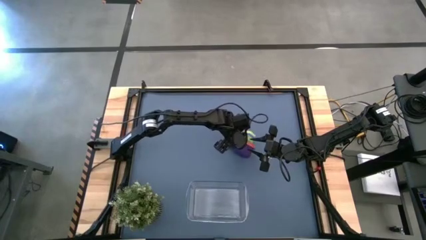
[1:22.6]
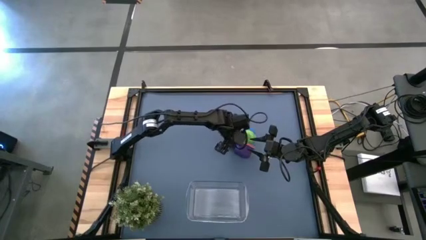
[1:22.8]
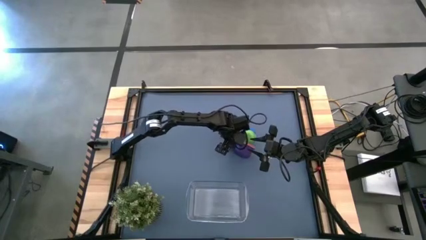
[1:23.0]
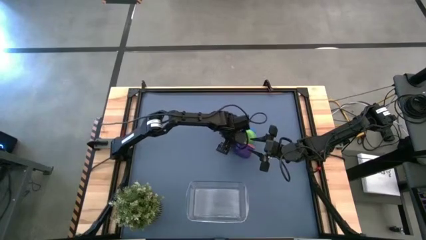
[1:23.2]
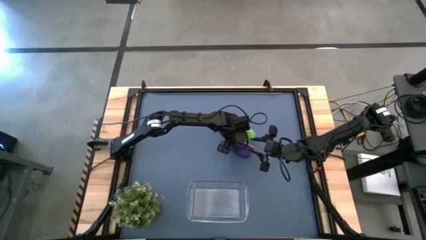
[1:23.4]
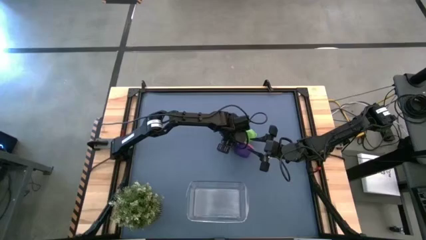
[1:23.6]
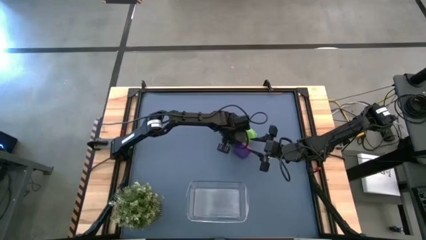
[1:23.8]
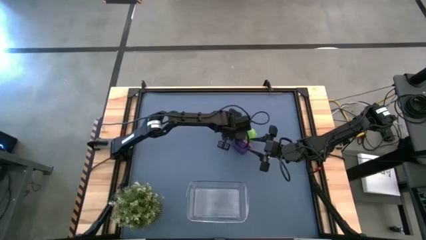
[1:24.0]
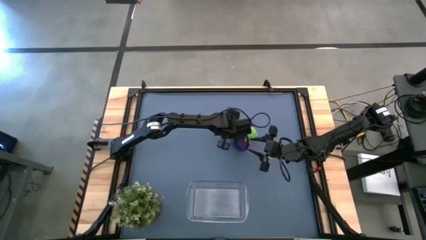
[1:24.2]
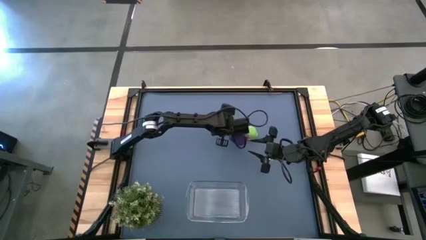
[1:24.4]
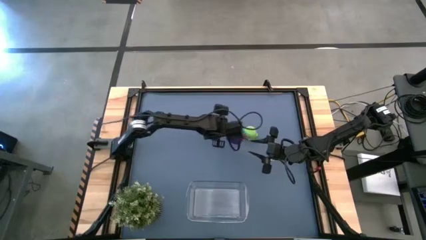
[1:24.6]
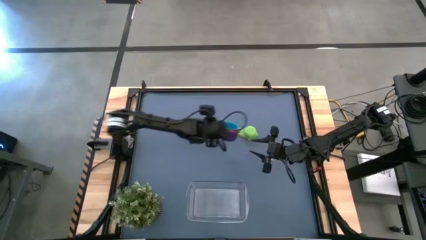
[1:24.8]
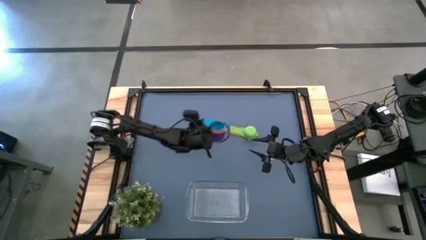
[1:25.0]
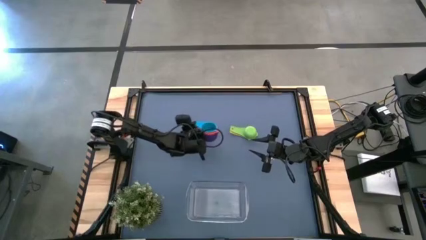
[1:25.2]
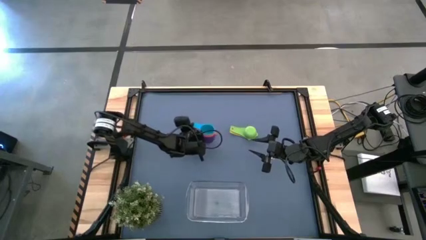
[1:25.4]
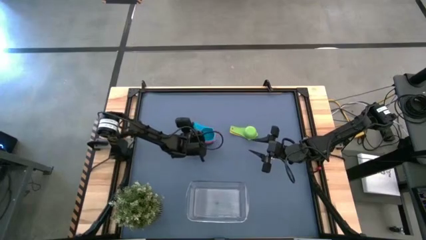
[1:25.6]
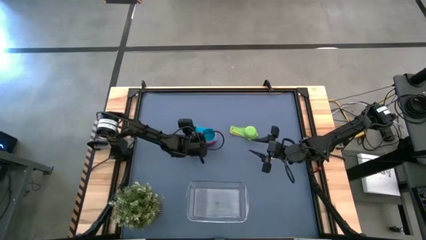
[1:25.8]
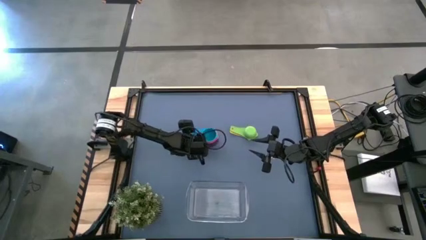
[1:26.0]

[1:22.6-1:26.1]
Task: Nest measuring cups in basket
Adjust the stacked measuring cups

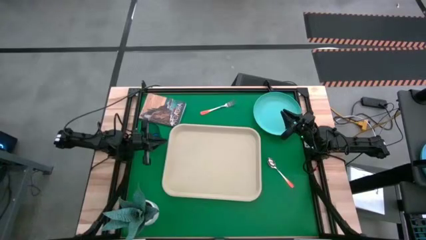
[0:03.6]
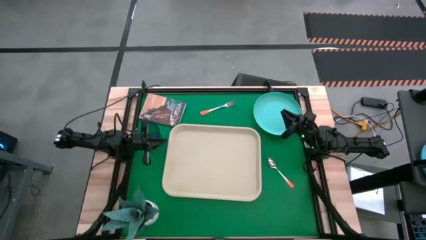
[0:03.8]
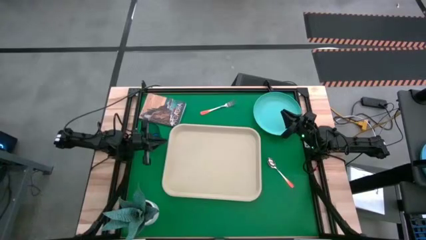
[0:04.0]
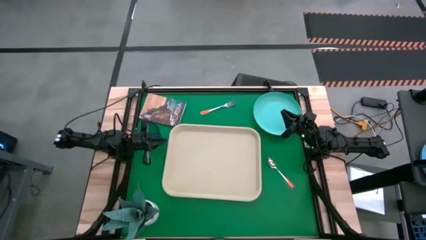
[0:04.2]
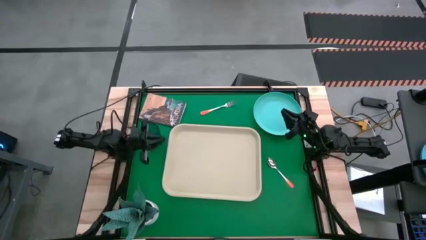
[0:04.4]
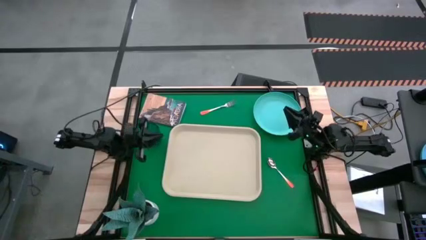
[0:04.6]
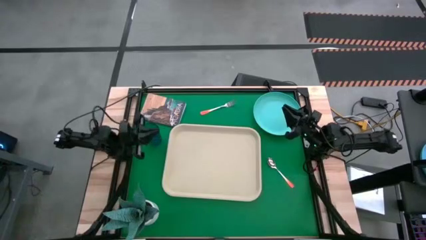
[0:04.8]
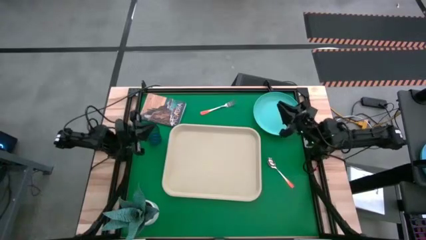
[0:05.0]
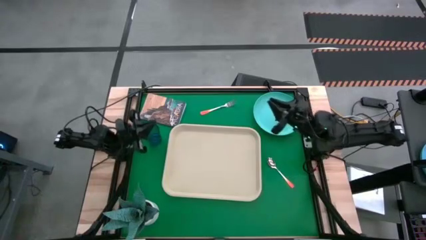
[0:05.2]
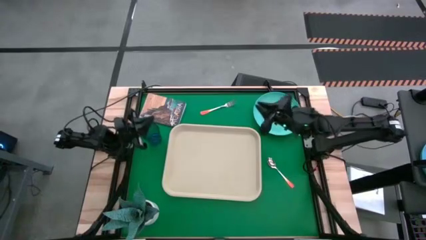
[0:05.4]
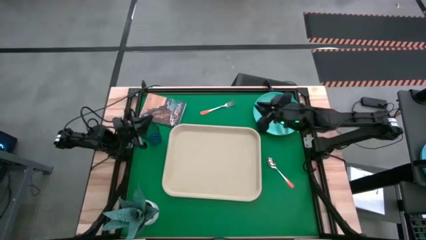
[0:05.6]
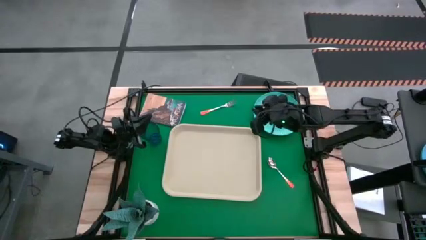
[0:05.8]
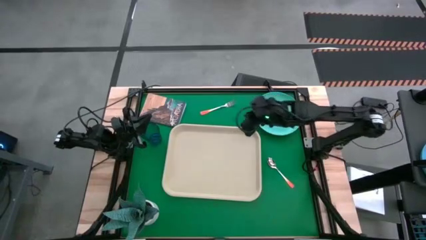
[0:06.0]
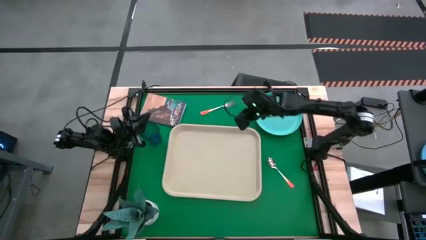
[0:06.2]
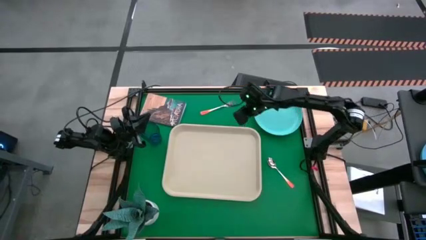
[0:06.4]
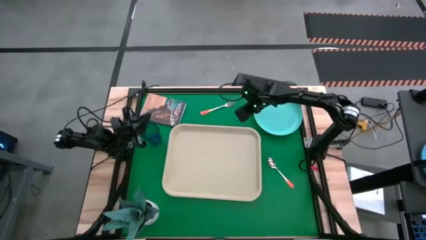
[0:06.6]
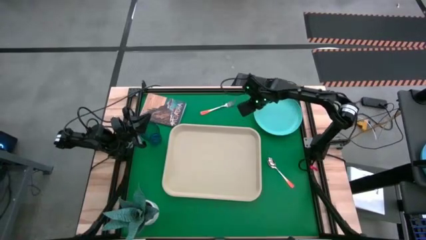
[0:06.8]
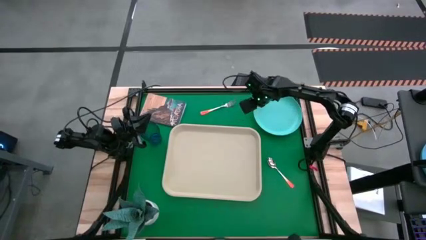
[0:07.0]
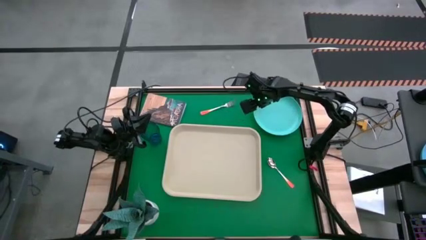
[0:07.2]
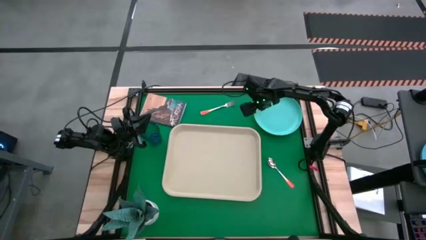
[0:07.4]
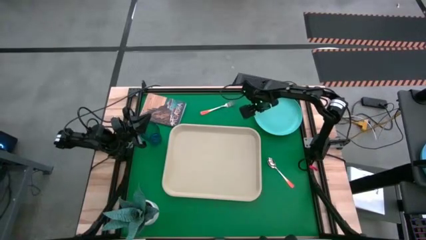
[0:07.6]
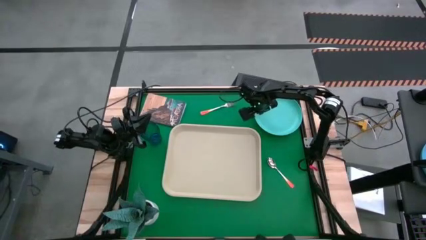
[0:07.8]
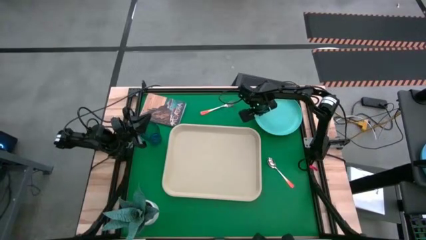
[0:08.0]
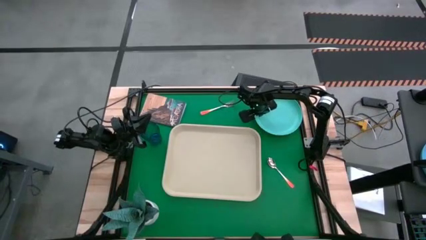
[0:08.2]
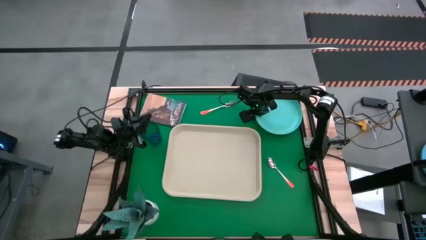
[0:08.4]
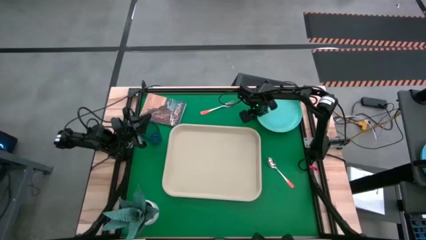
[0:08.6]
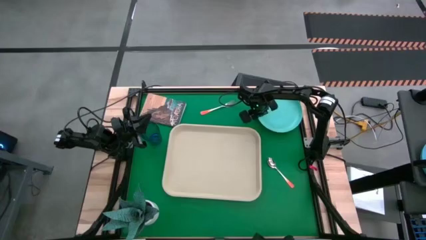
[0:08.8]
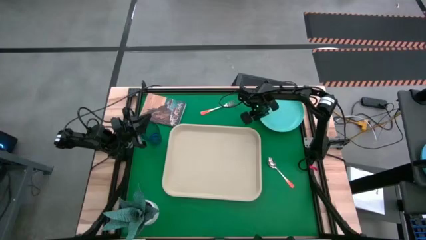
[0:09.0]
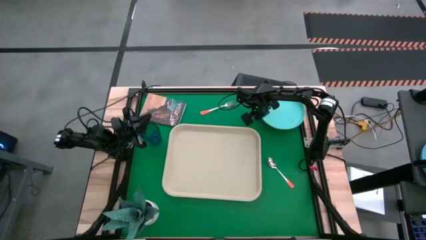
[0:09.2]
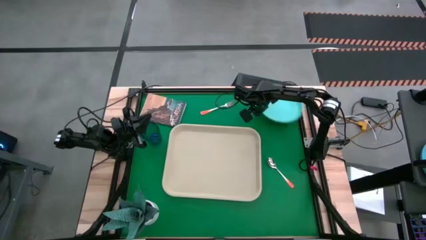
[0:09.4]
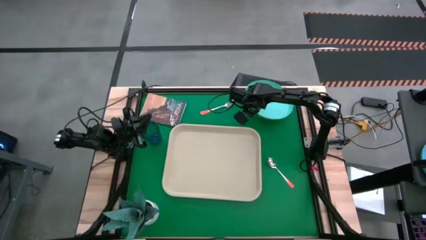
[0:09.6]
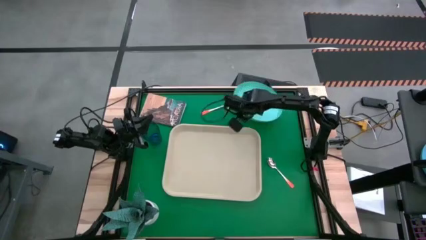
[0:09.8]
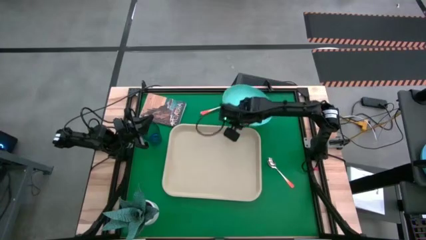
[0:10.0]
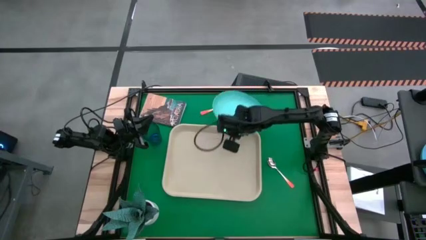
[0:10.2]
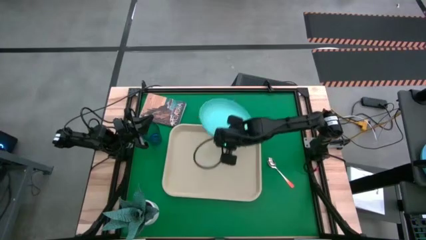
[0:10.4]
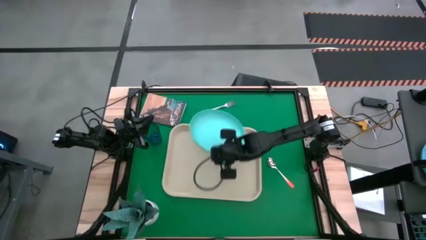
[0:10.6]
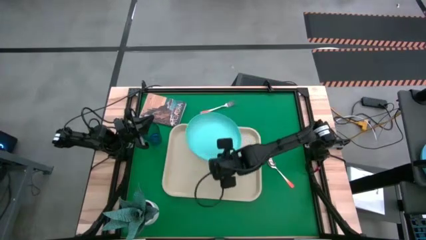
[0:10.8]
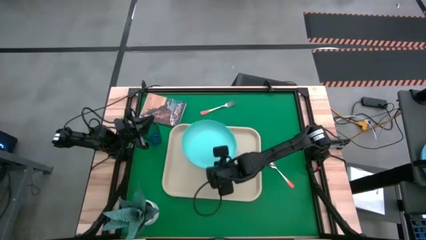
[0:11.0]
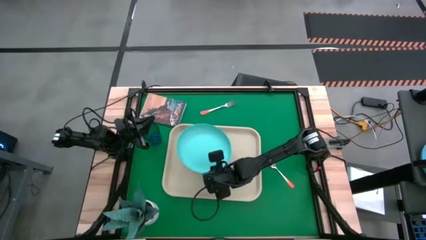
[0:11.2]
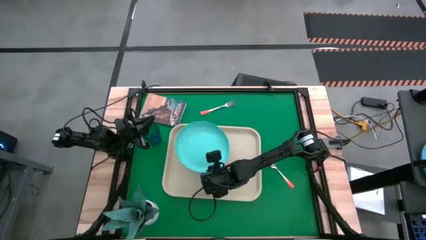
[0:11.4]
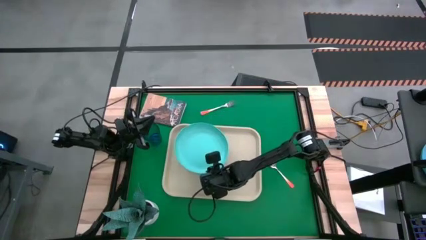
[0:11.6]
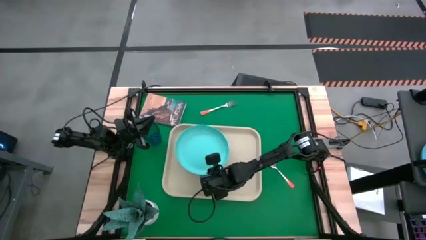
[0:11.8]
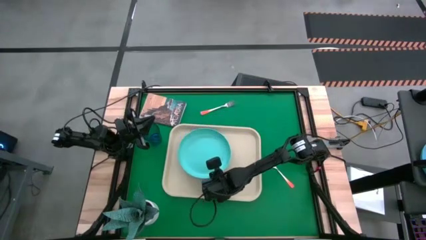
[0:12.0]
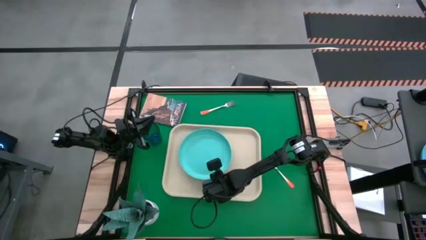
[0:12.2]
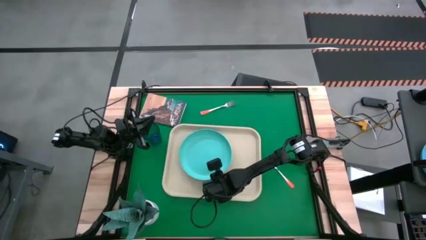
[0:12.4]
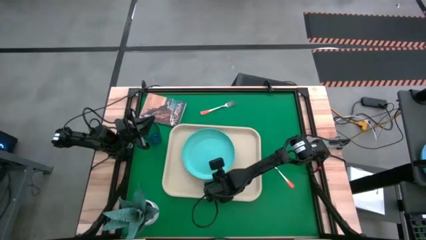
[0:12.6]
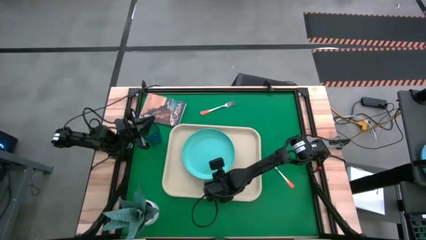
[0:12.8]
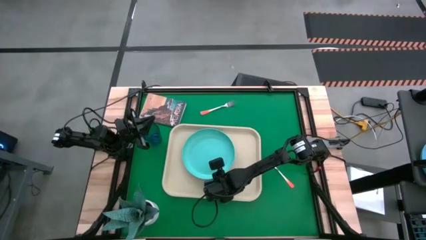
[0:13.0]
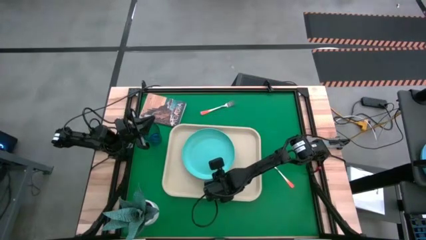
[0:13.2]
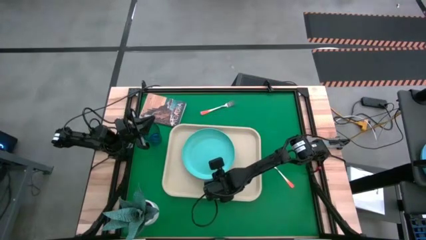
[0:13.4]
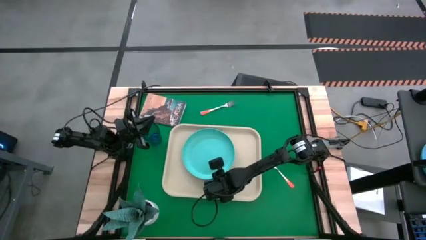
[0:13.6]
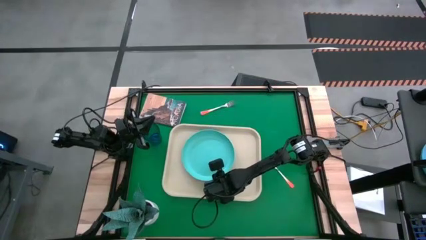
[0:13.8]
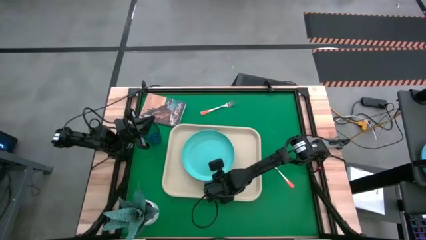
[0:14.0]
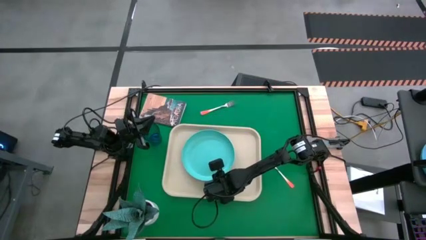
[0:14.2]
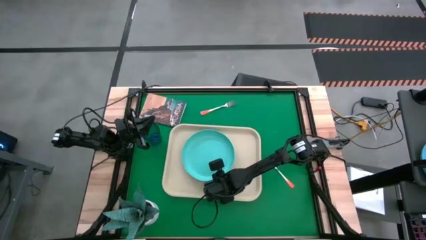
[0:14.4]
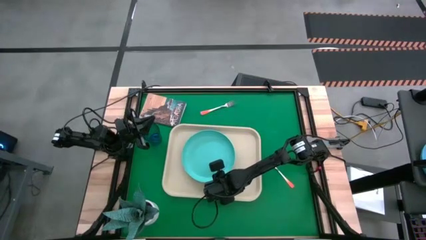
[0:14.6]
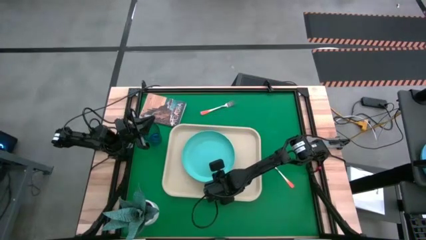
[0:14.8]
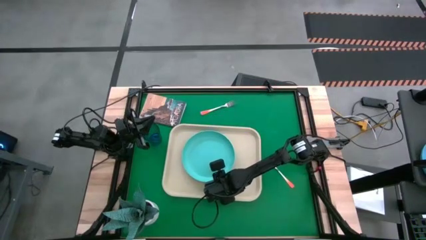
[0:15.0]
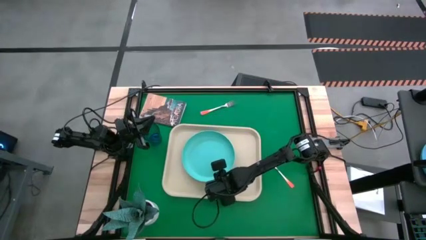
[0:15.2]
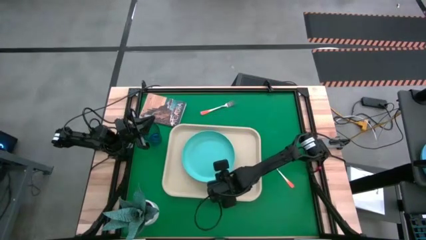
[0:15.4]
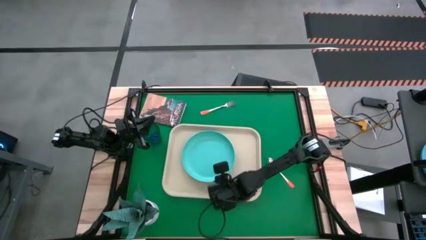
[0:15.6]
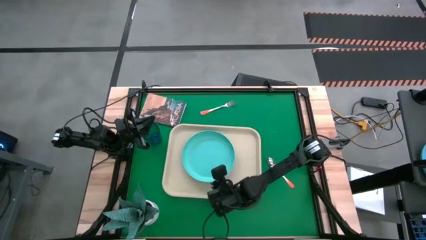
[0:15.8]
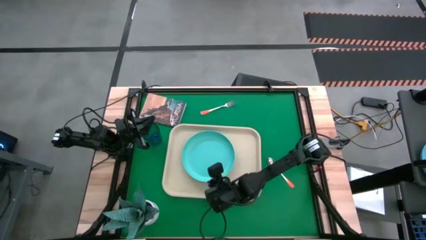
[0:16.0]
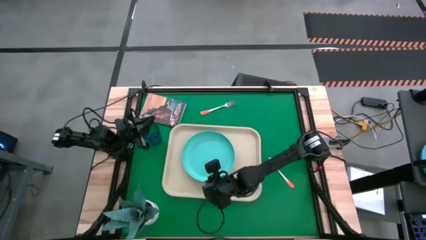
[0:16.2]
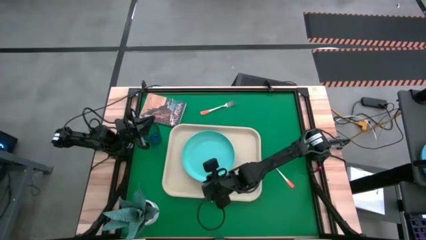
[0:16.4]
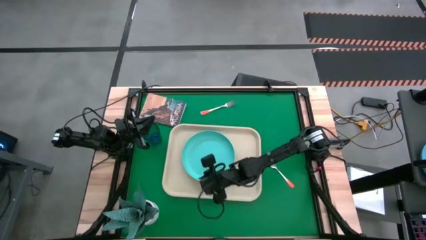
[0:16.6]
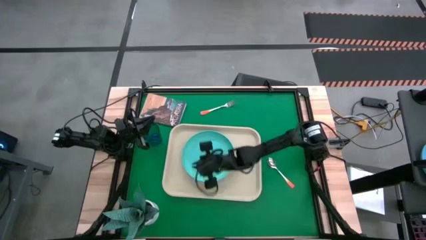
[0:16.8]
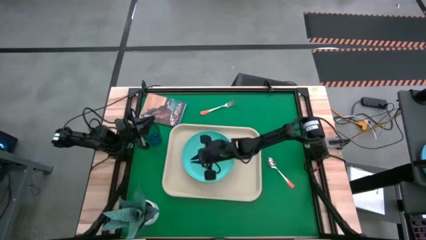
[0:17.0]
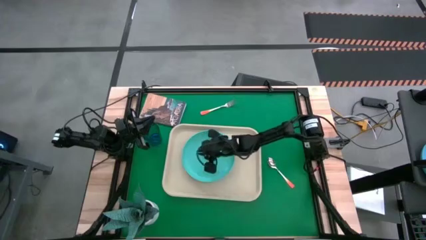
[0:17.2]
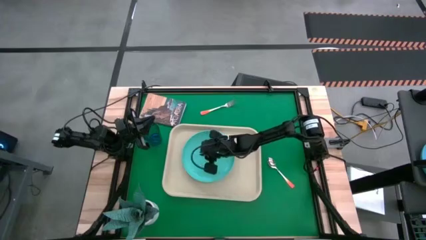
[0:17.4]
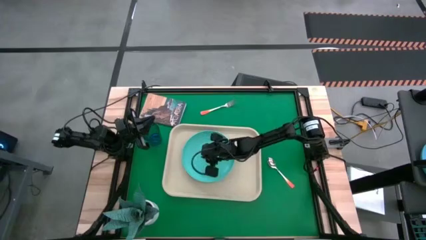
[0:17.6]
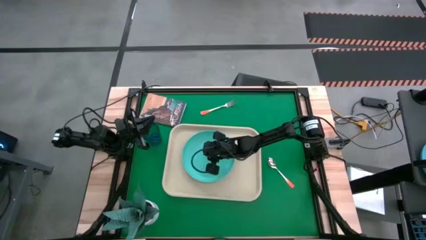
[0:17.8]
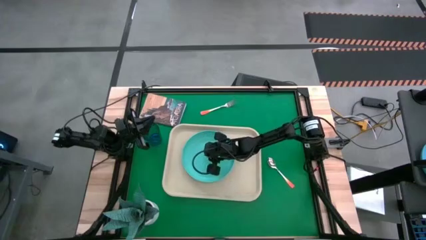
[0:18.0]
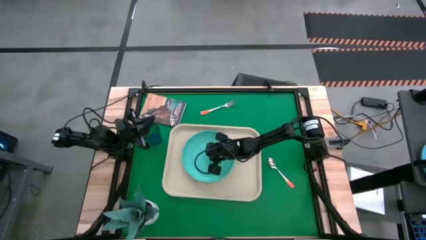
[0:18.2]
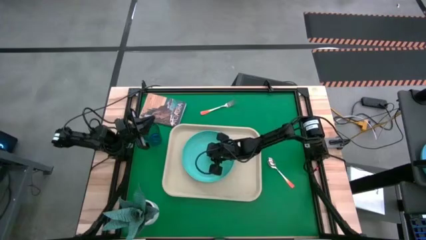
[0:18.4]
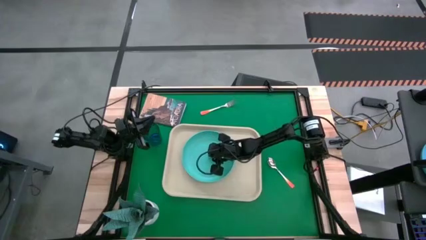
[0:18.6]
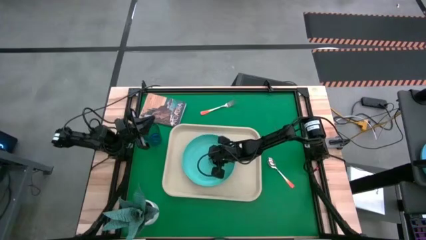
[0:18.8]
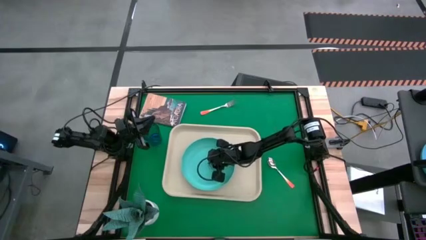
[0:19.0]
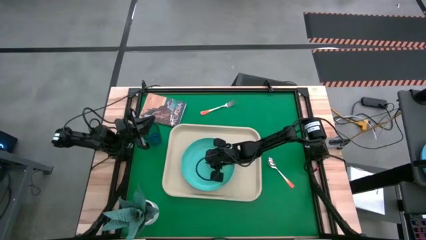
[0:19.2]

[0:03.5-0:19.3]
Task: Pick and place plate/cup/fork/spoon on tray
Put the blue plate on the white tray
